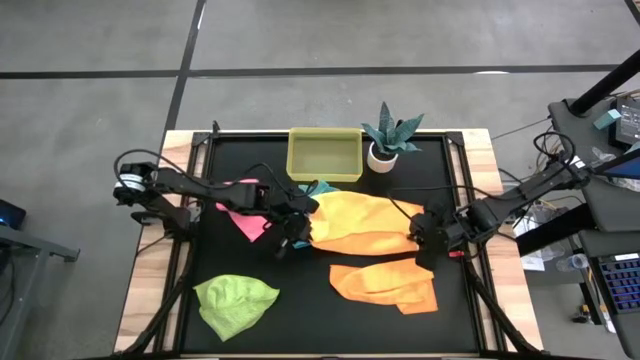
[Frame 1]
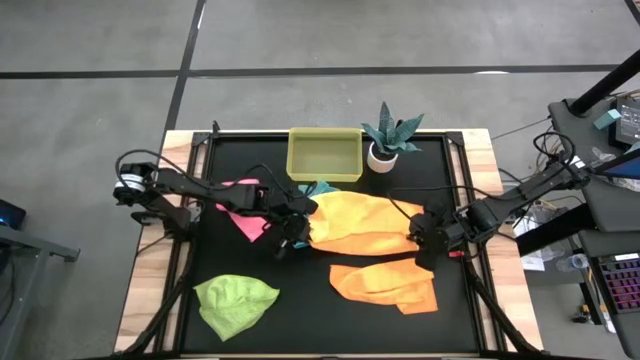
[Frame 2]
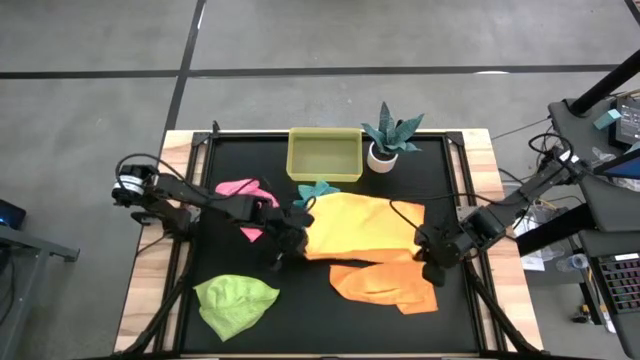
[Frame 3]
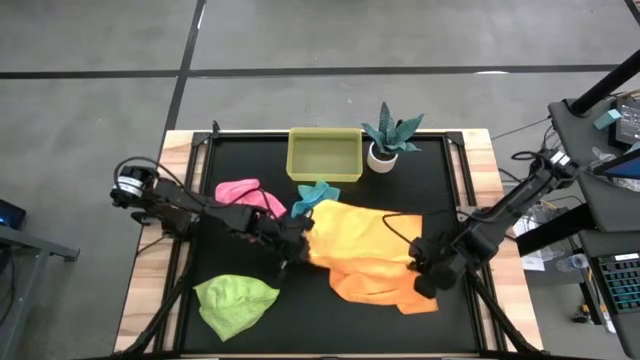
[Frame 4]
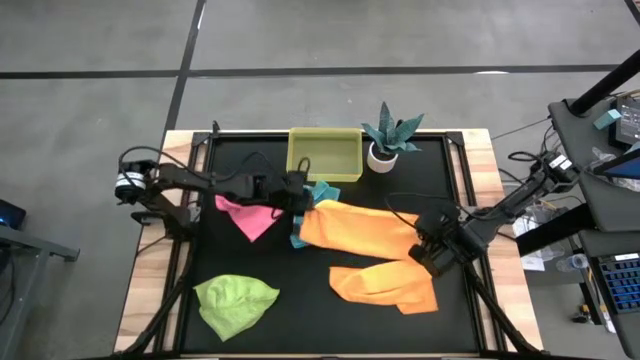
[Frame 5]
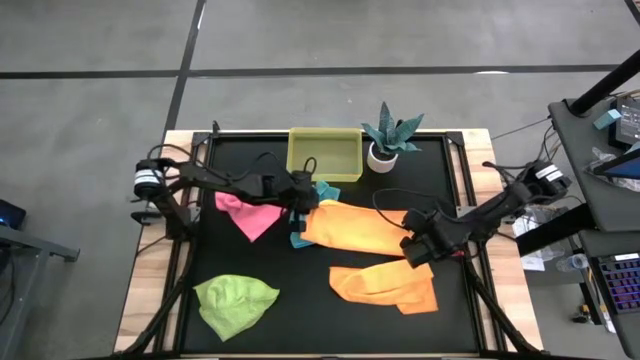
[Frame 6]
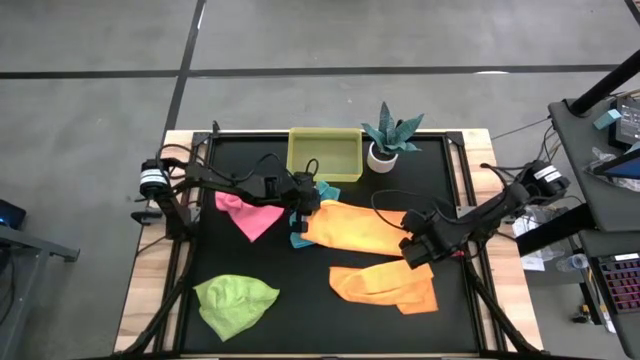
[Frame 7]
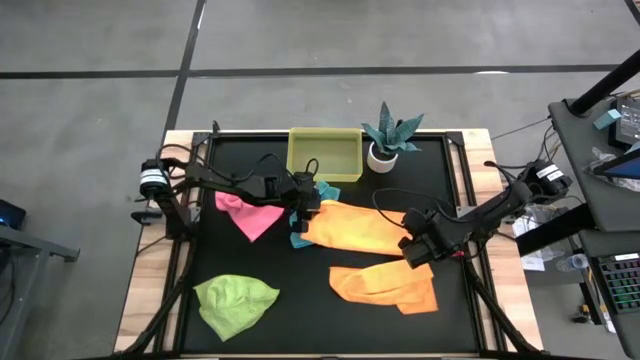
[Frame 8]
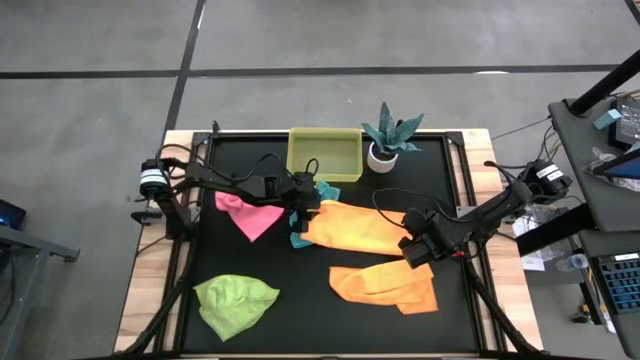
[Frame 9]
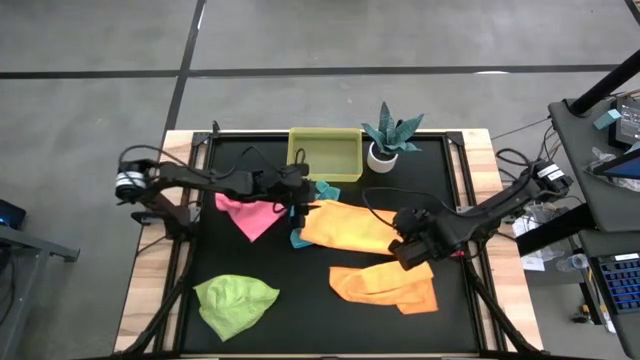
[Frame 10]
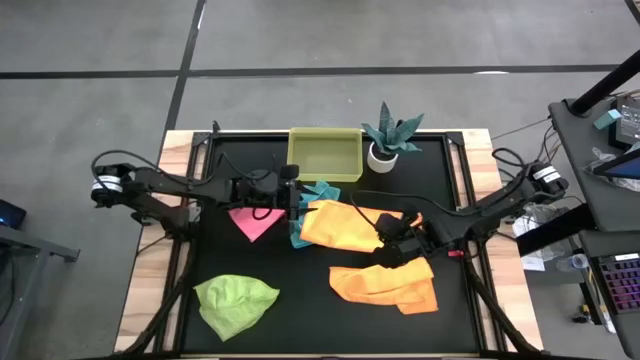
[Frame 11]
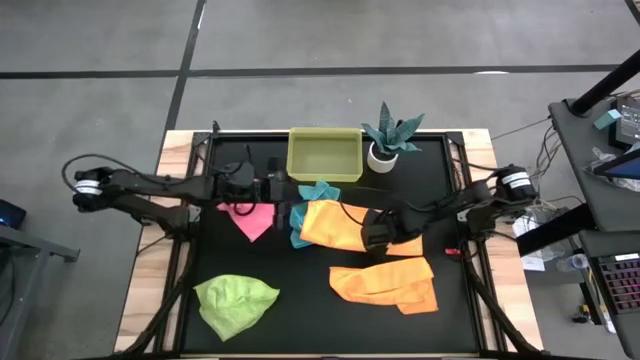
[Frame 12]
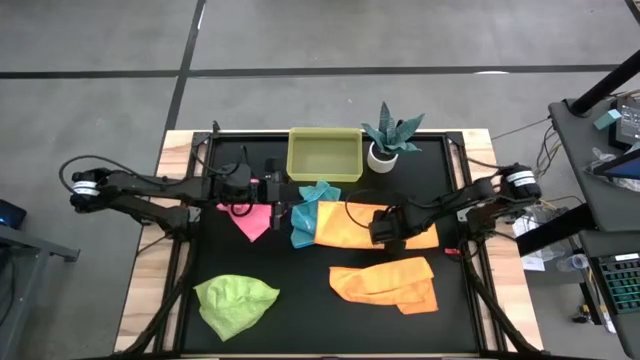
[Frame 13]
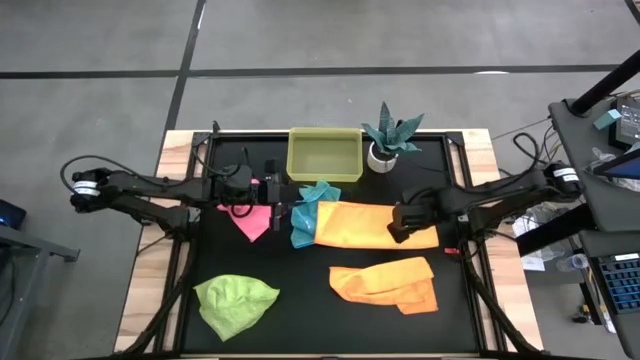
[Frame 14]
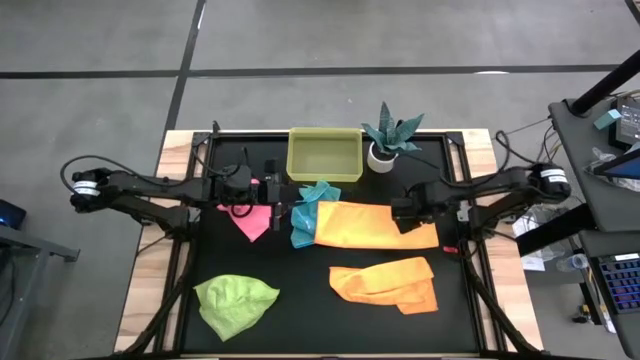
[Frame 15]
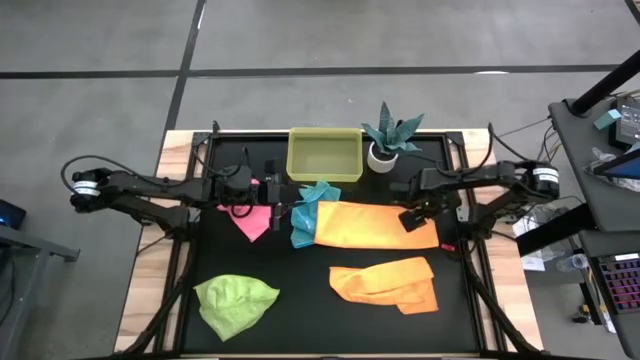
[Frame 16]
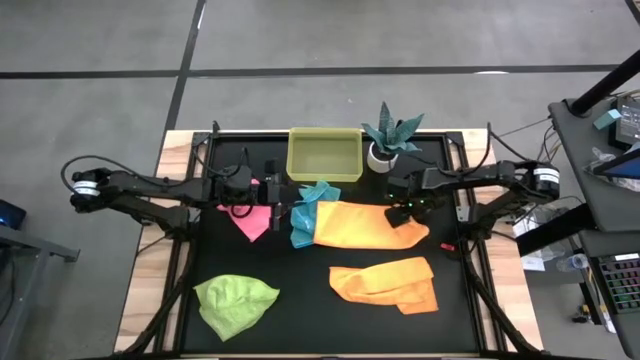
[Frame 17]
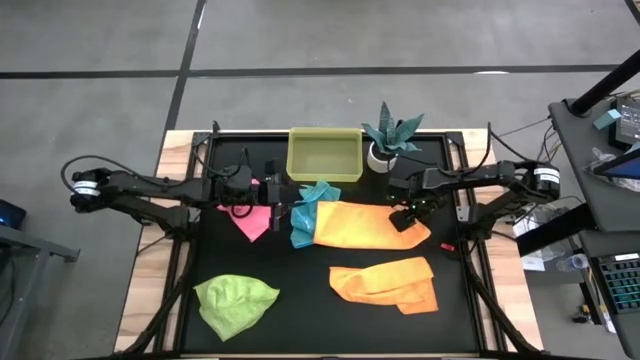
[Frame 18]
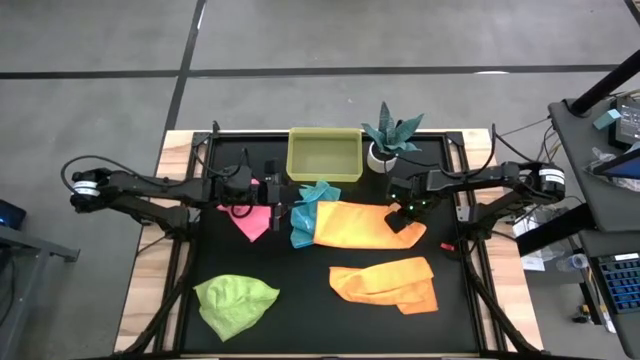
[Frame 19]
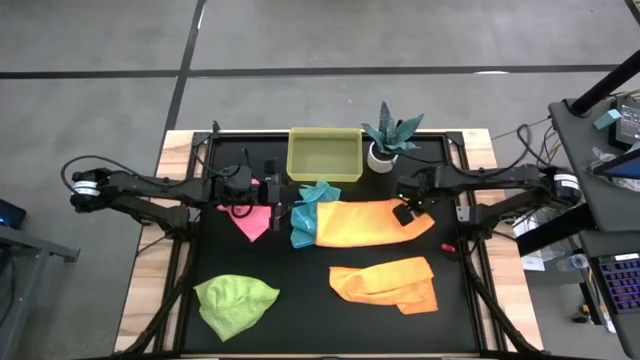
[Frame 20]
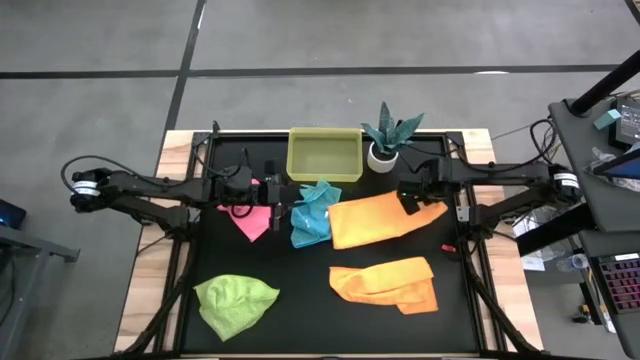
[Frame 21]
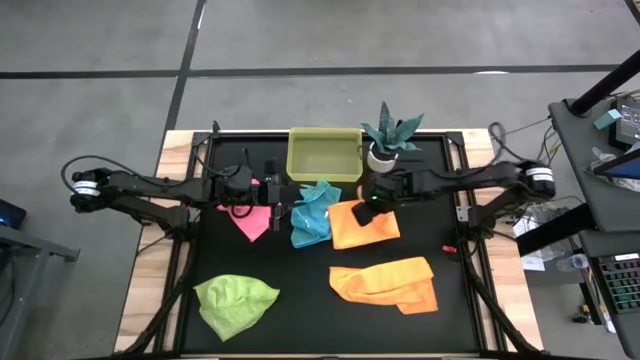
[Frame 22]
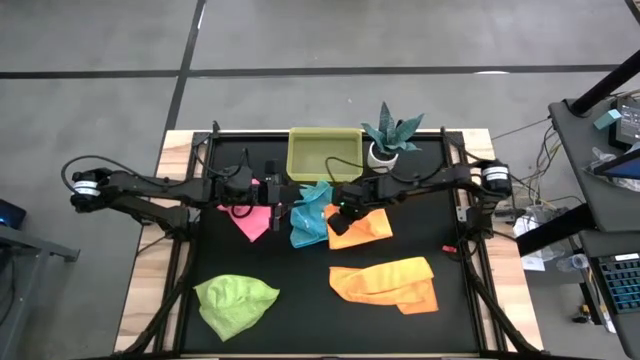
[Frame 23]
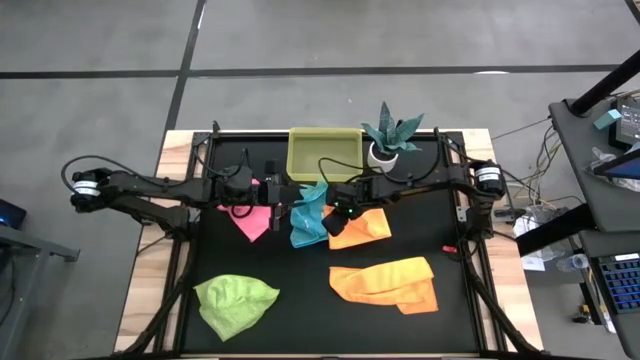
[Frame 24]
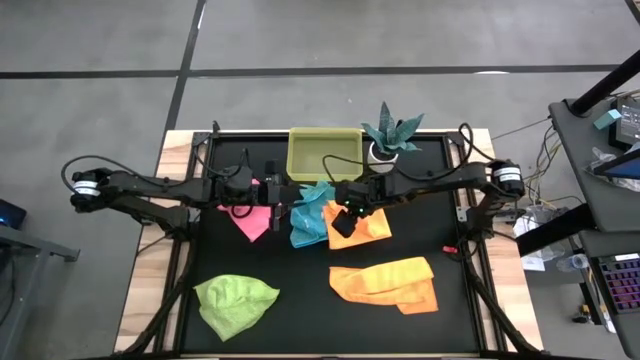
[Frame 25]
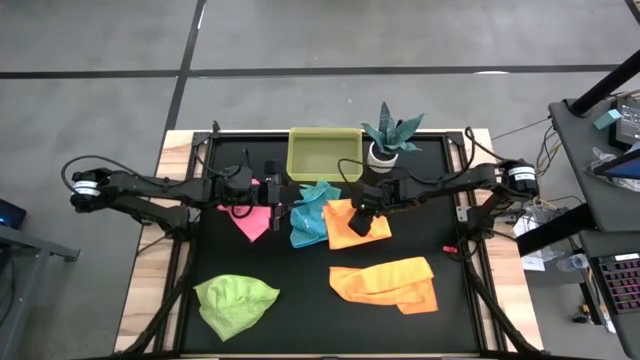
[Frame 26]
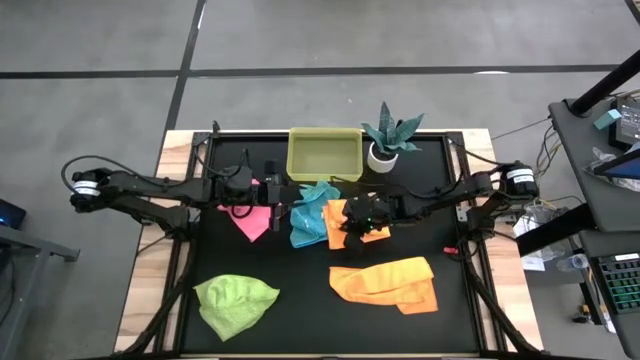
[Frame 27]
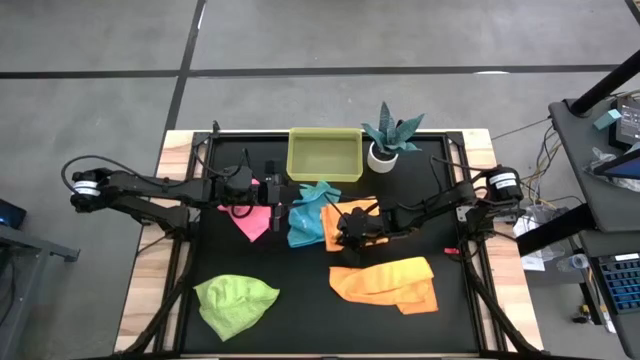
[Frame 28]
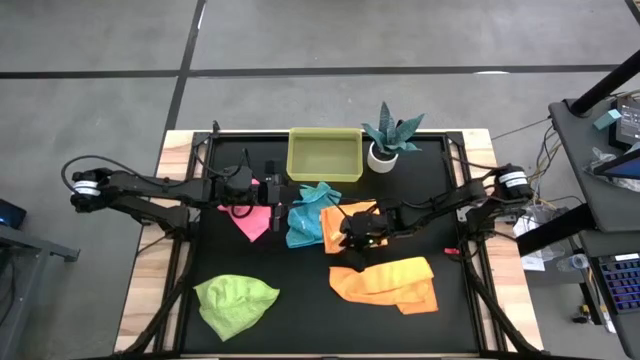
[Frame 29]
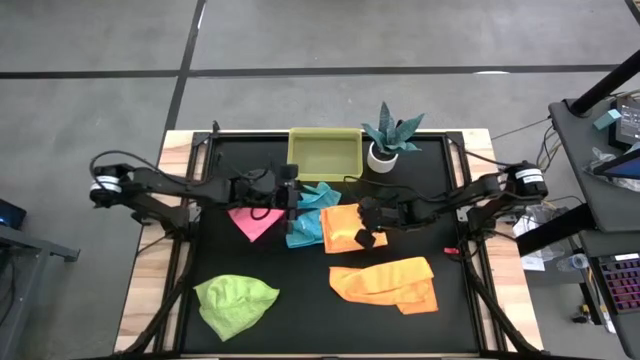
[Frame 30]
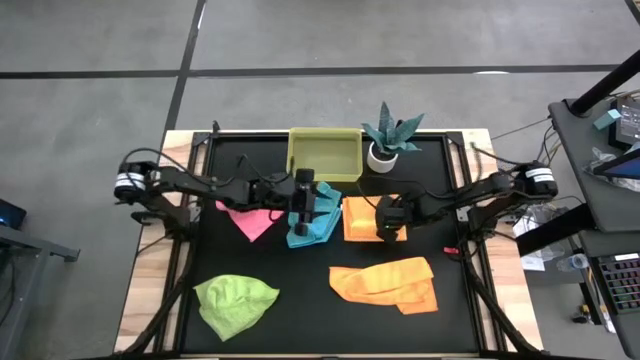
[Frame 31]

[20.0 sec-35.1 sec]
Task: Fold microfiber towels
Fold the top orange microfiber cloth

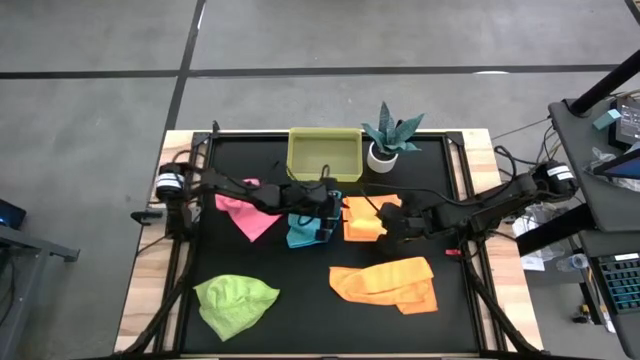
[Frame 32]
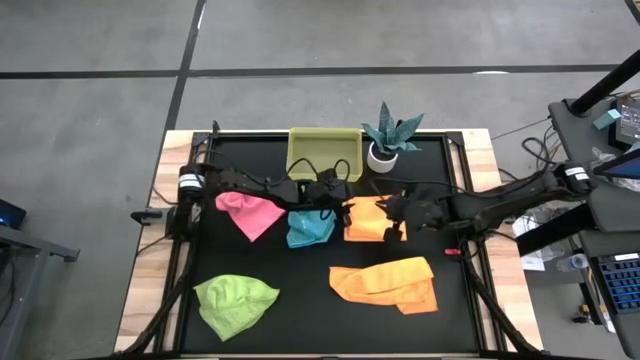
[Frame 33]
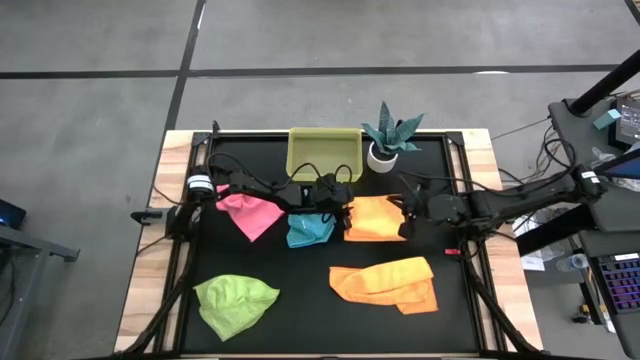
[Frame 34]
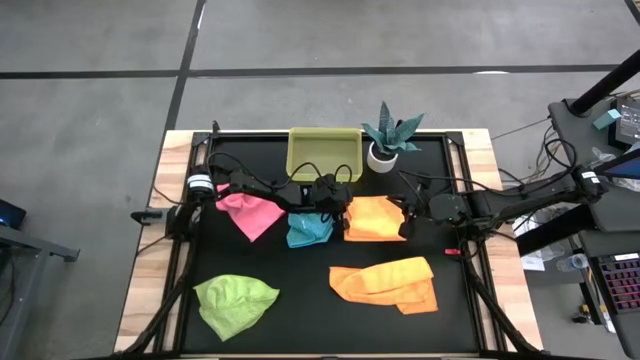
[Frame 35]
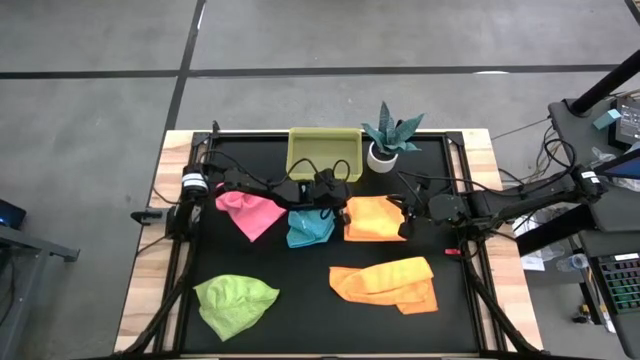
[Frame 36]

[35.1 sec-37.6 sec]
Fold the top orange microfiber cloth

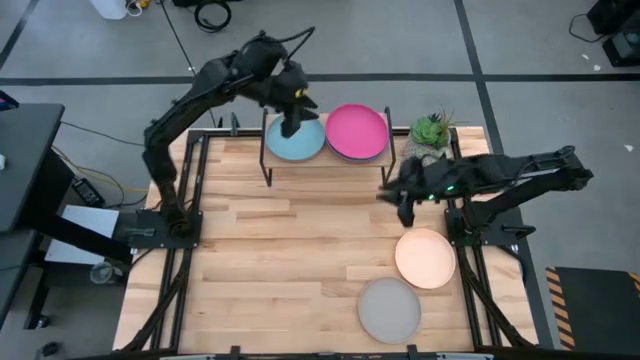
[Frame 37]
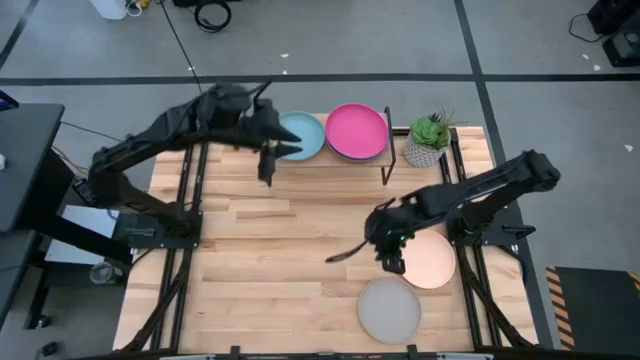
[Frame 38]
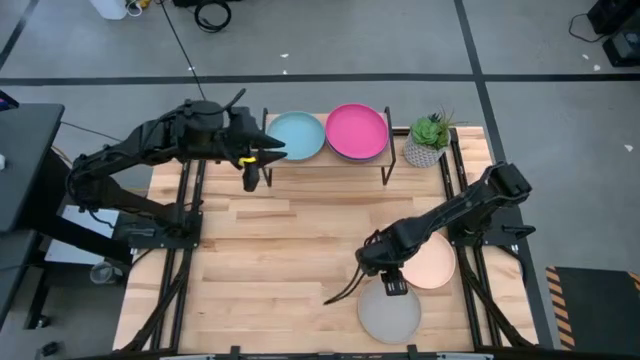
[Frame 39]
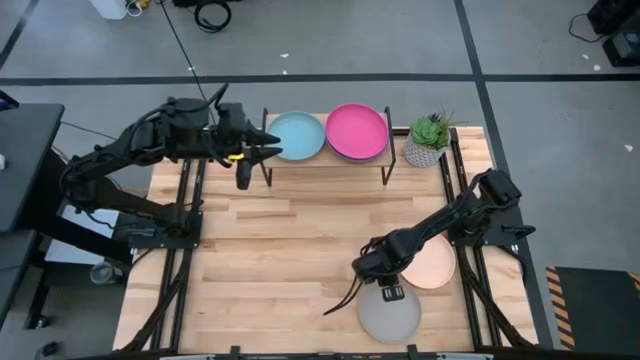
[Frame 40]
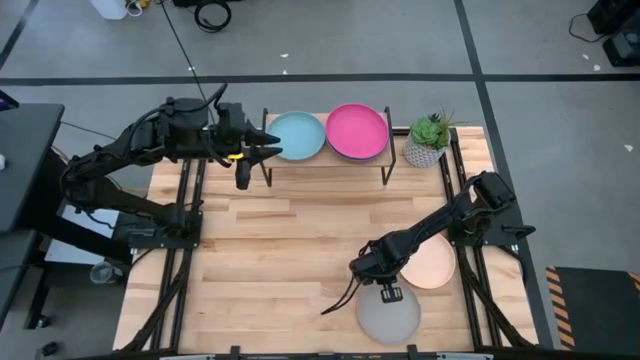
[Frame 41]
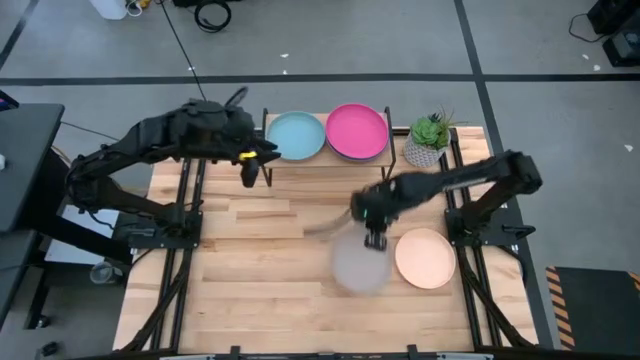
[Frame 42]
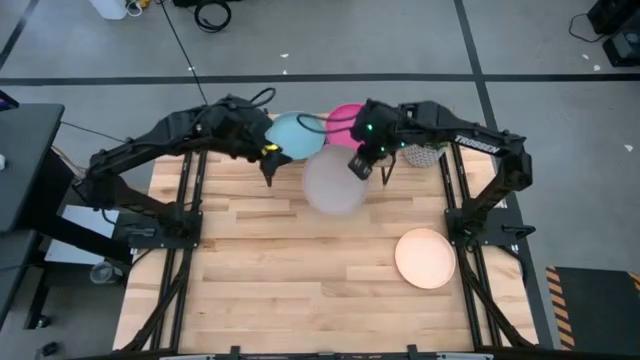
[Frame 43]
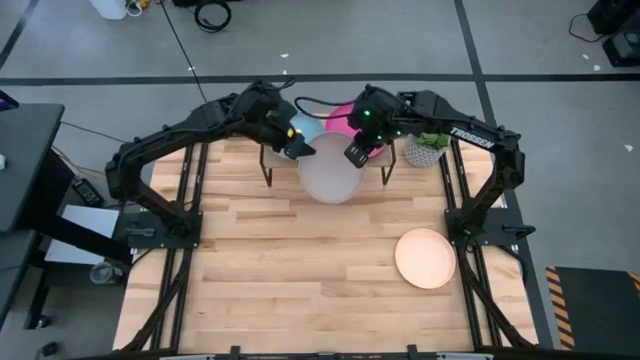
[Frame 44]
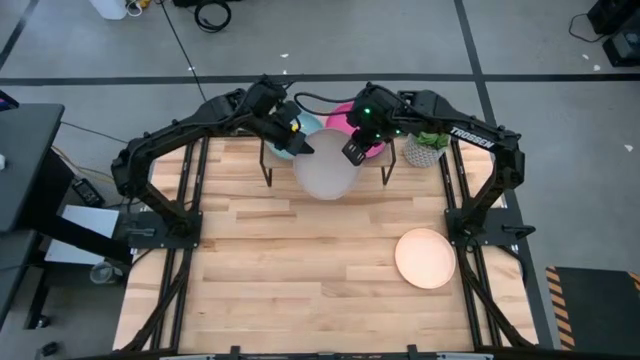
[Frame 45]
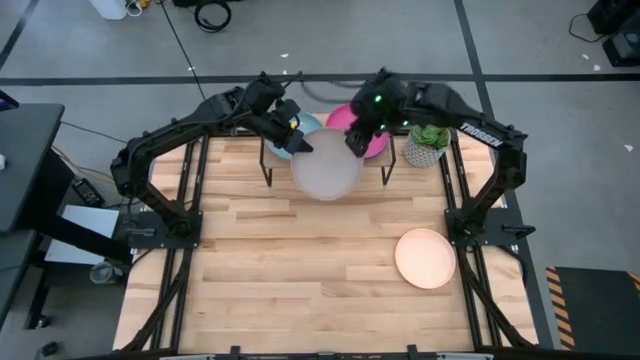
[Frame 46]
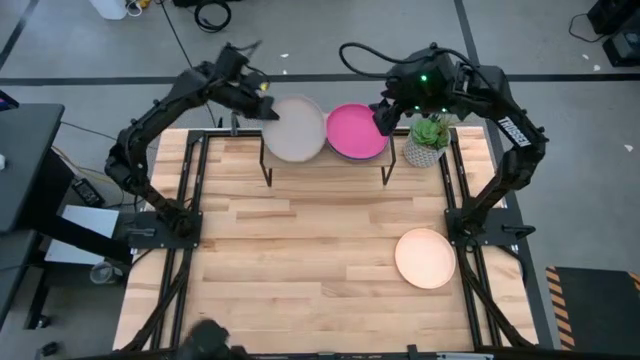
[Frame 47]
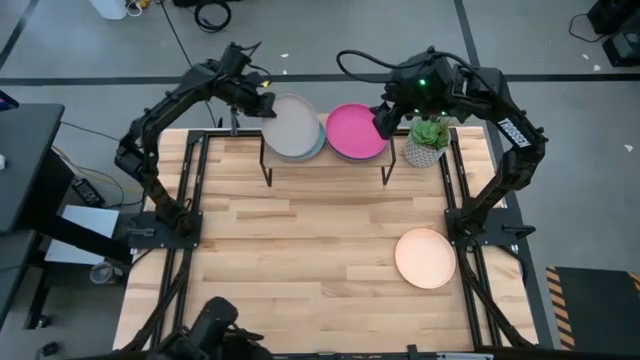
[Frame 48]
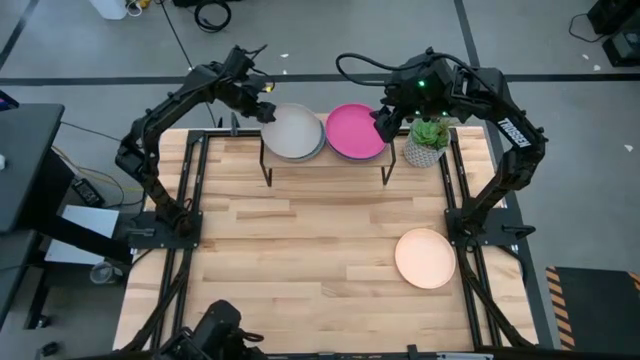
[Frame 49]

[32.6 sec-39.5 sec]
Task: Place and stack plates onto a shelf
Stack the gray plate on top of the light blue plate on the shelf
